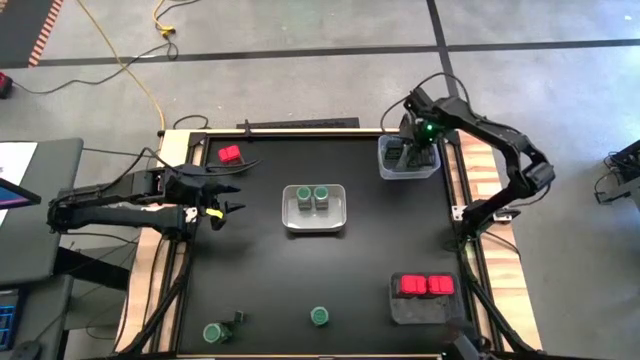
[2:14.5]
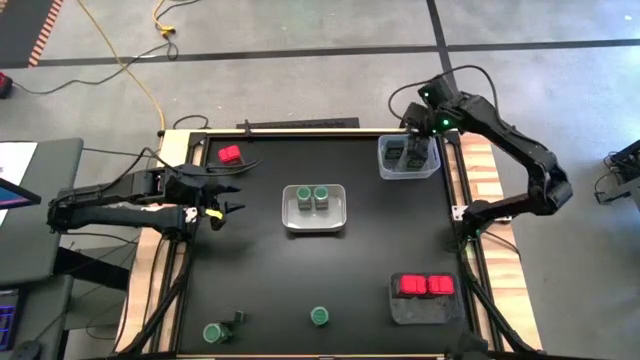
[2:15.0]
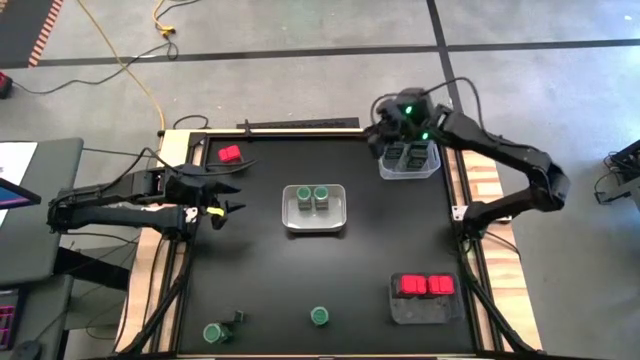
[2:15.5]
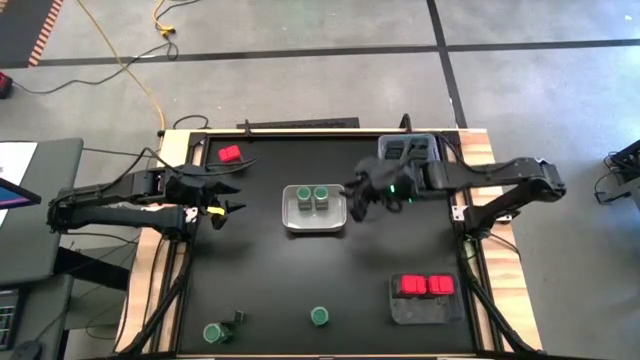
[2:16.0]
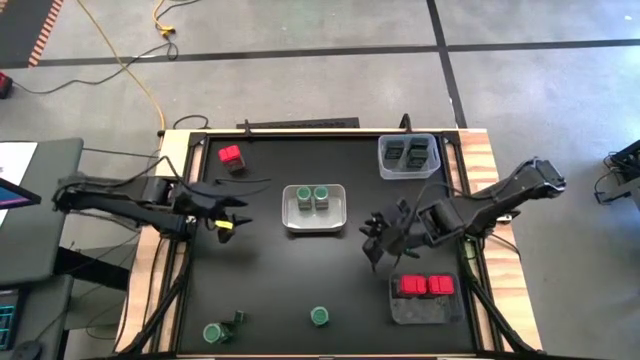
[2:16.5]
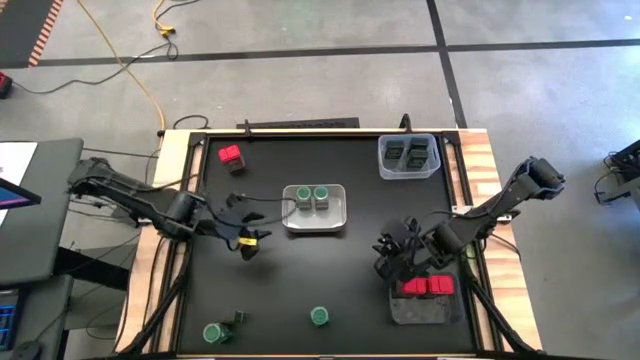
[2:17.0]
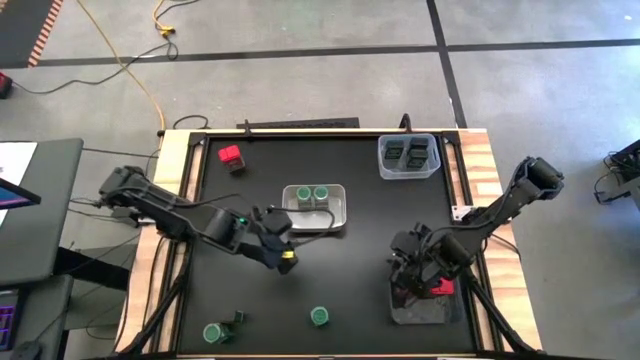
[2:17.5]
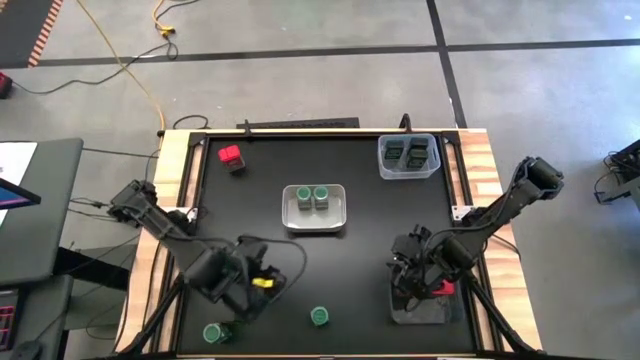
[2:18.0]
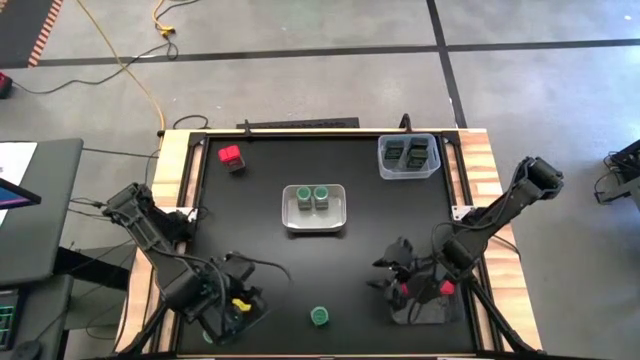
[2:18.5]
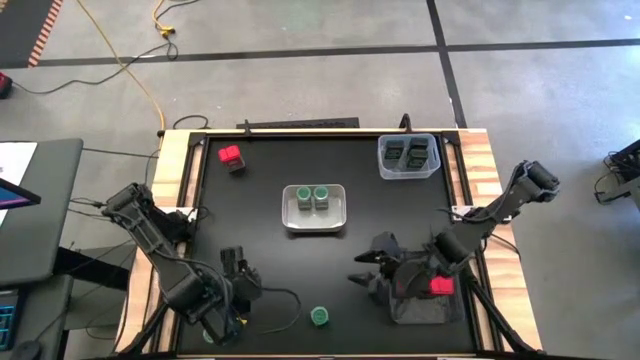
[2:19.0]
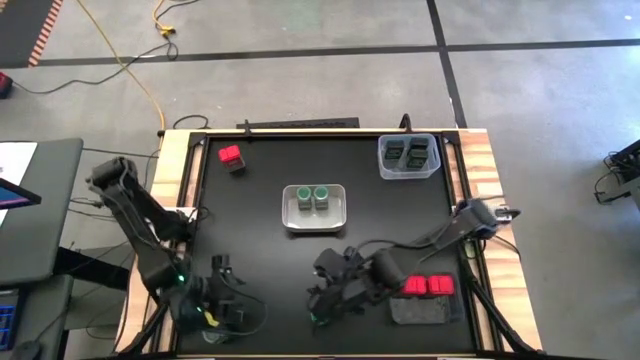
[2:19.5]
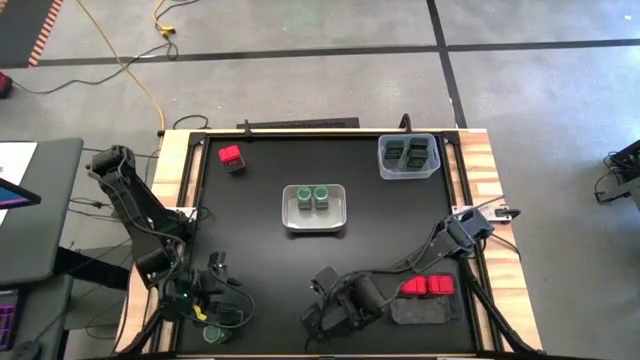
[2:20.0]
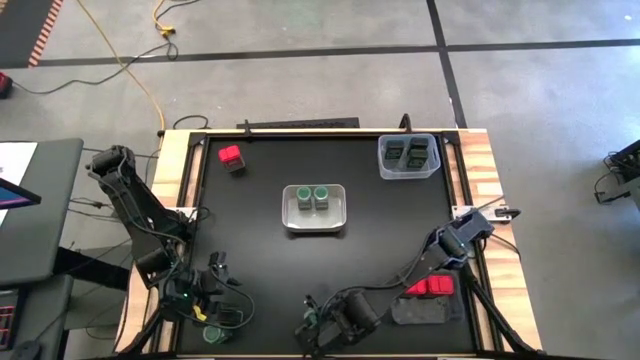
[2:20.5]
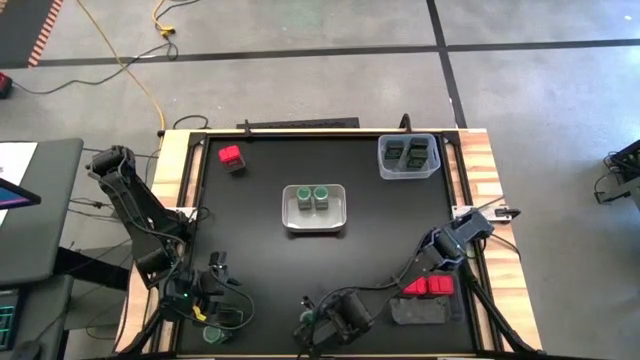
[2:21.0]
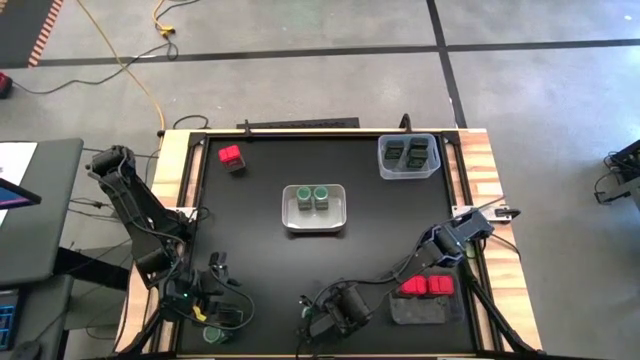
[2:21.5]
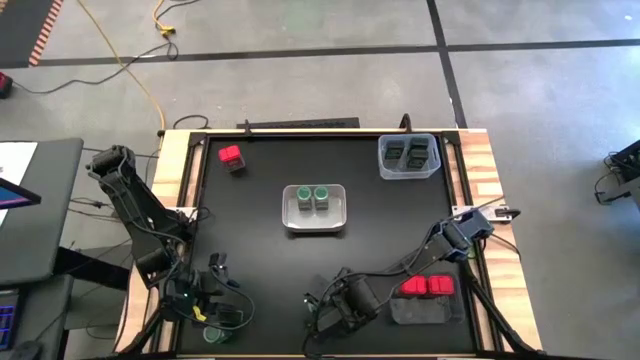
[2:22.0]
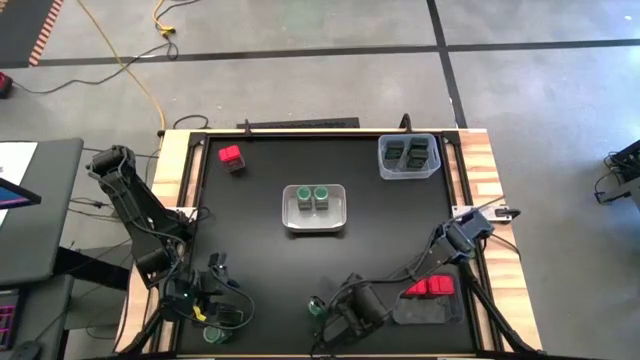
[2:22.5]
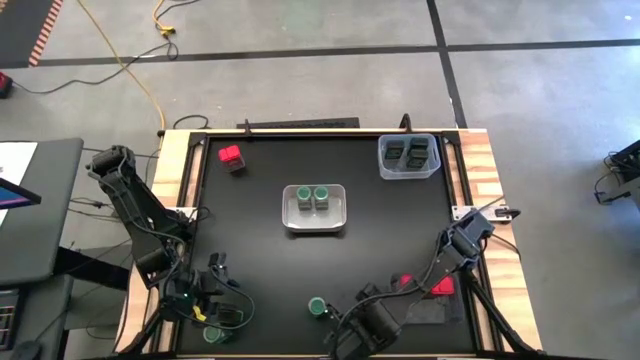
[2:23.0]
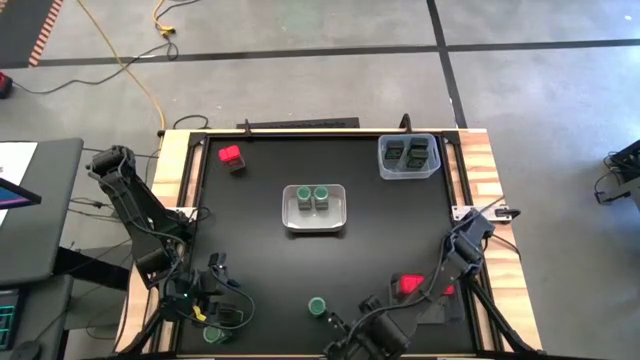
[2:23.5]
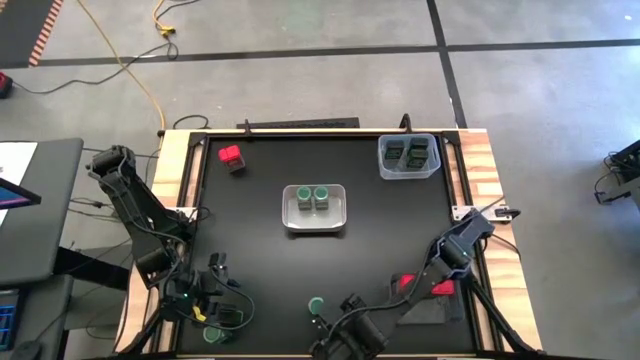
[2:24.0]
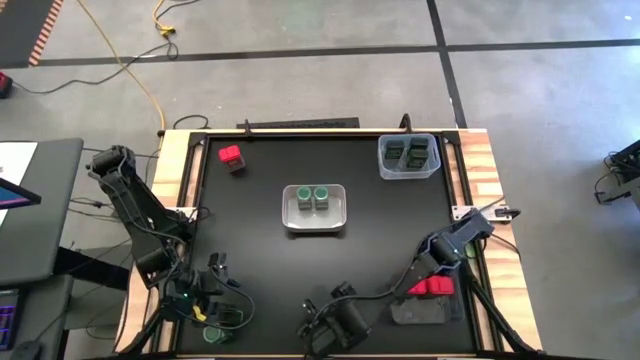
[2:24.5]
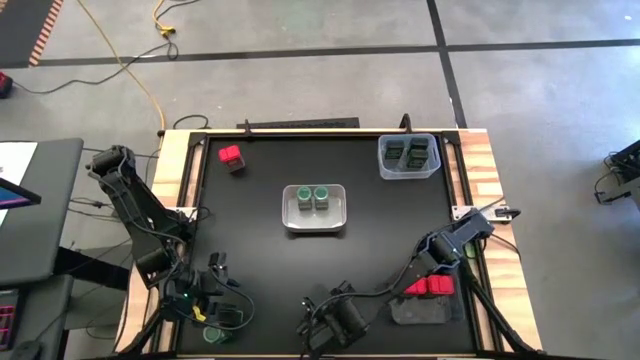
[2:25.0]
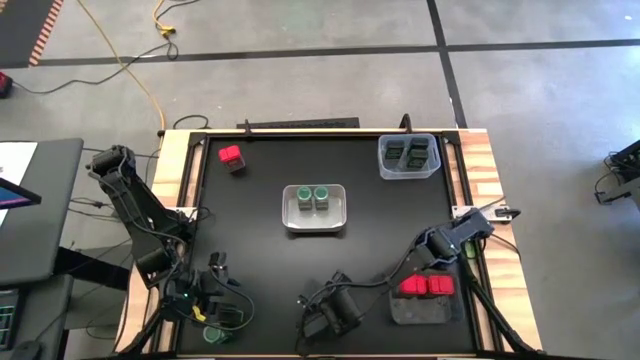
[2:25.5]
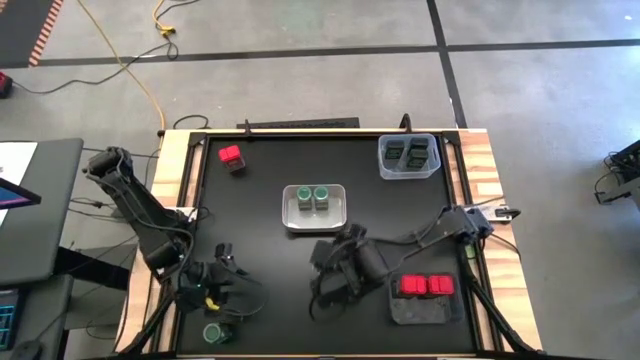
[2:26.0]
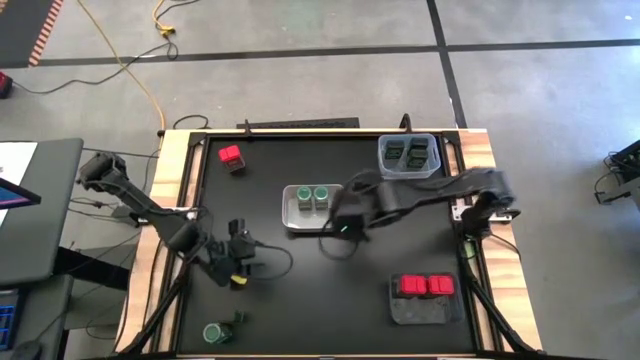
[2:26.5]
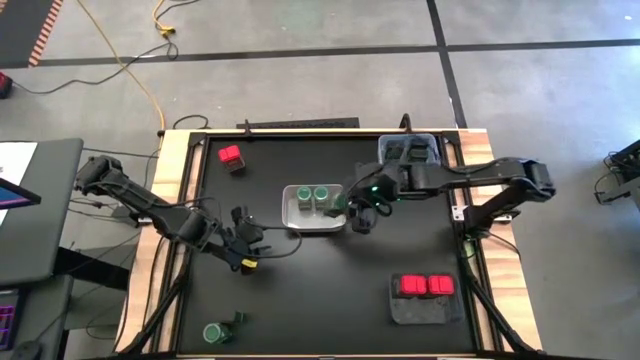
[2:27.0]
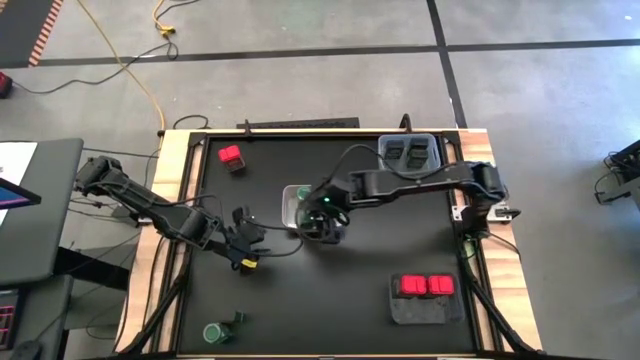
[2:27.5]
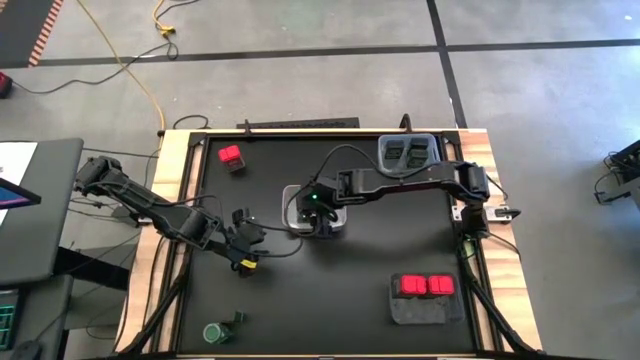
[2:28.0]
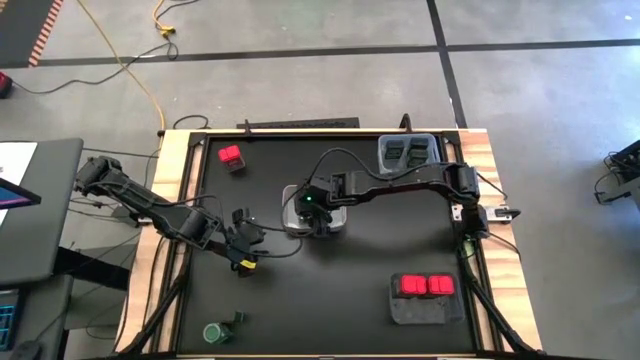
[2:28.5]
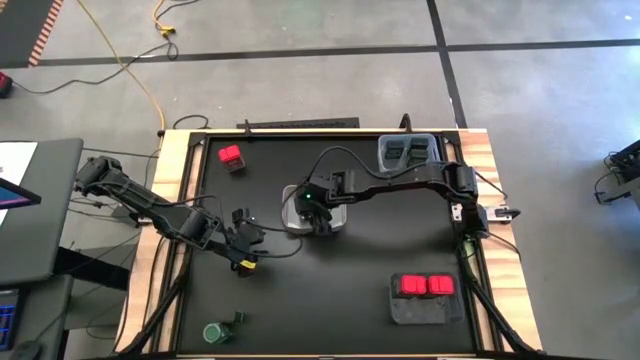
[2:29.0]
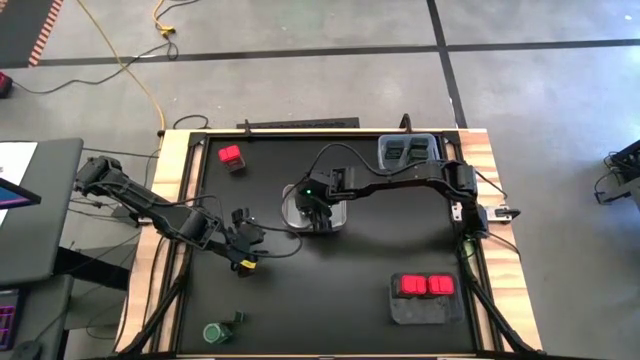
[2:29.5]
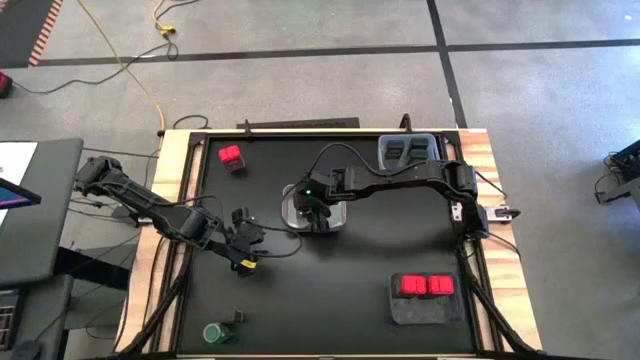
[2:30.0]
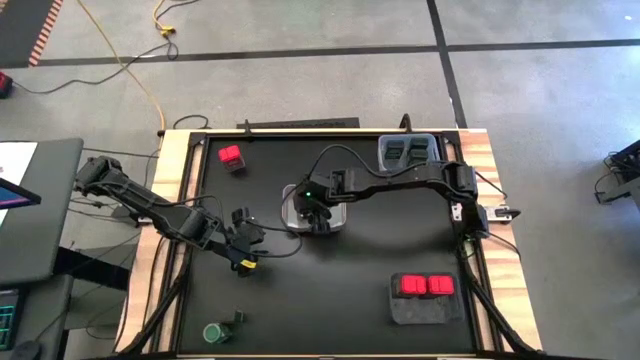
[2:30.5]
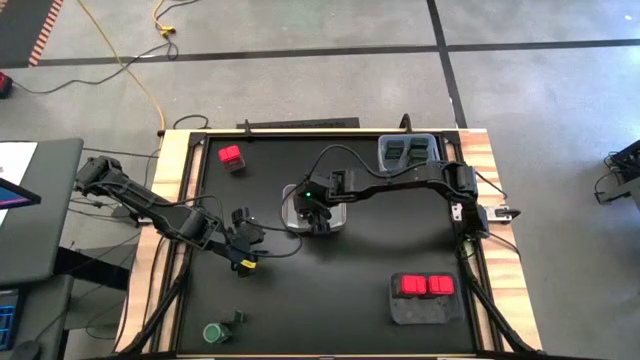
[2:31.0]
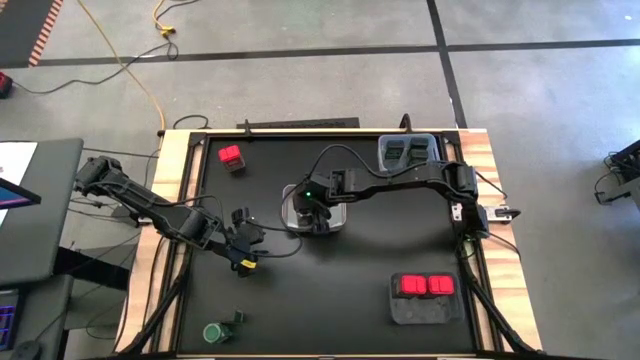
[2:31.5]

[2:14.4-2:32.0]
Task: Sort spices by type
Put the top green seasoning bottle into the white bin

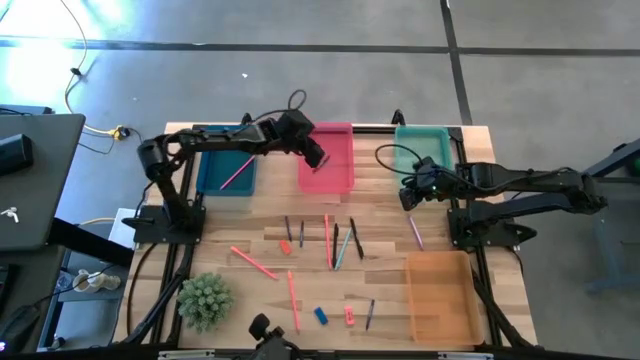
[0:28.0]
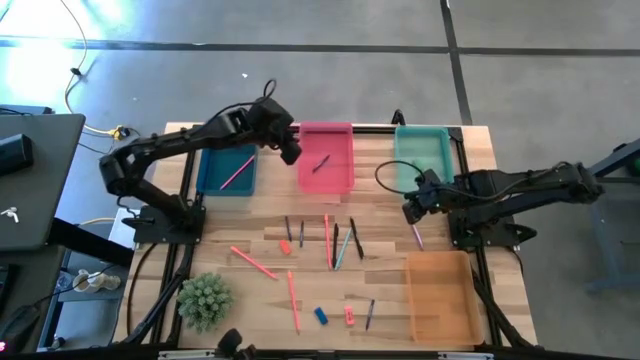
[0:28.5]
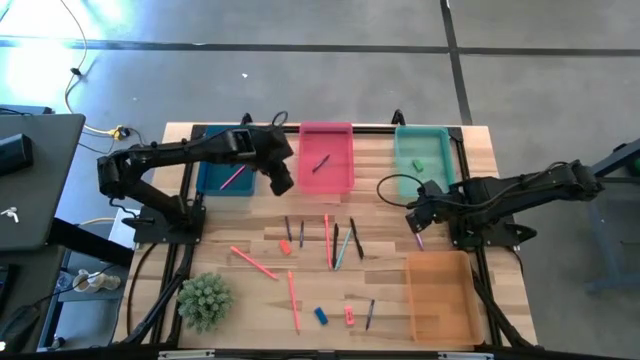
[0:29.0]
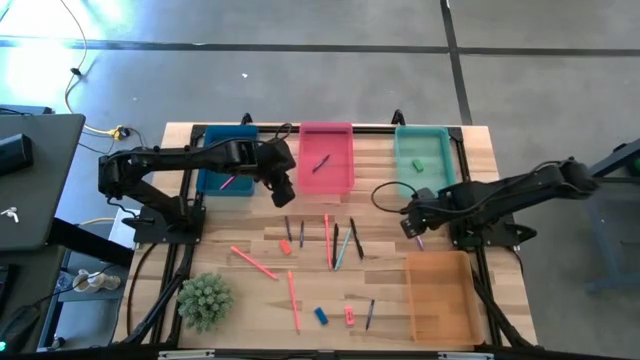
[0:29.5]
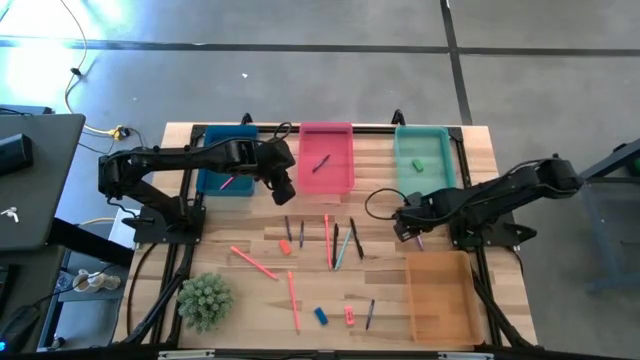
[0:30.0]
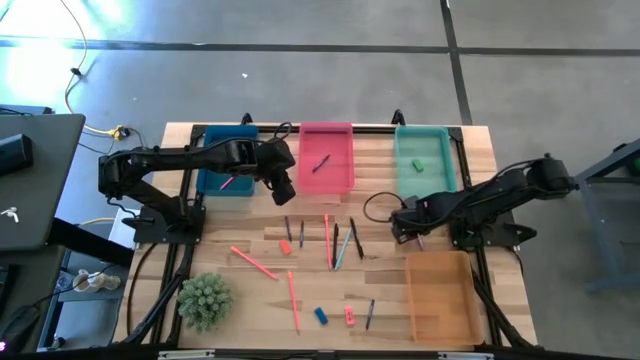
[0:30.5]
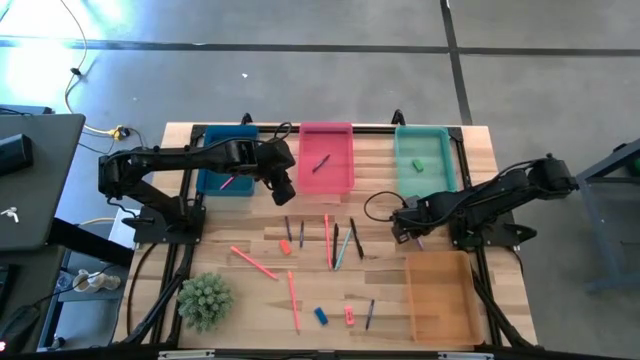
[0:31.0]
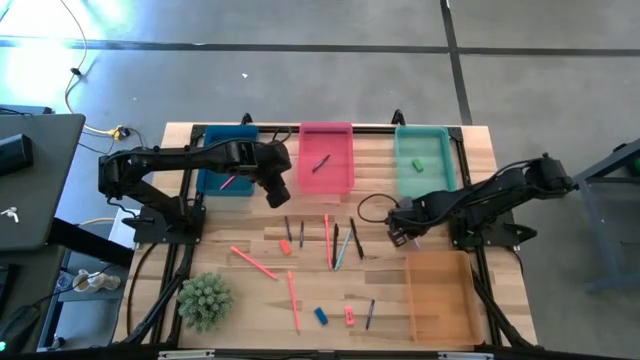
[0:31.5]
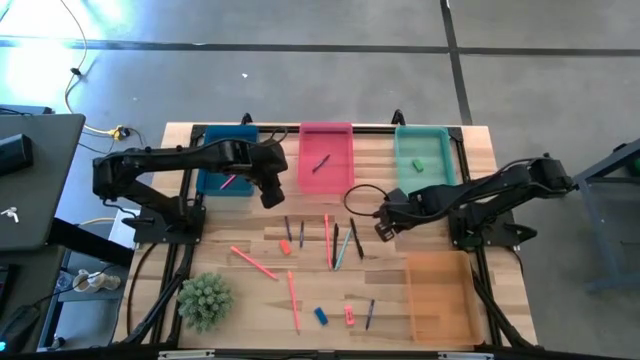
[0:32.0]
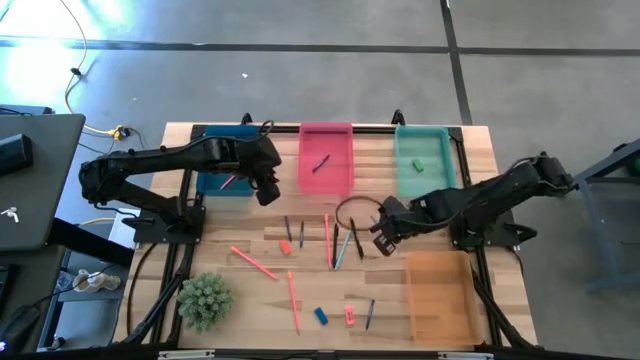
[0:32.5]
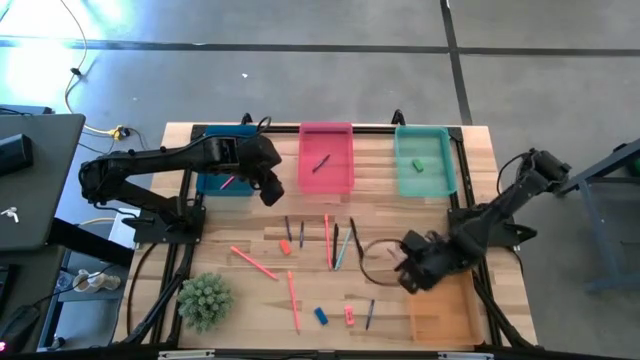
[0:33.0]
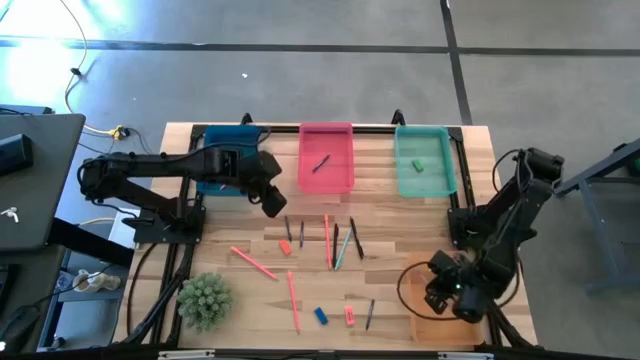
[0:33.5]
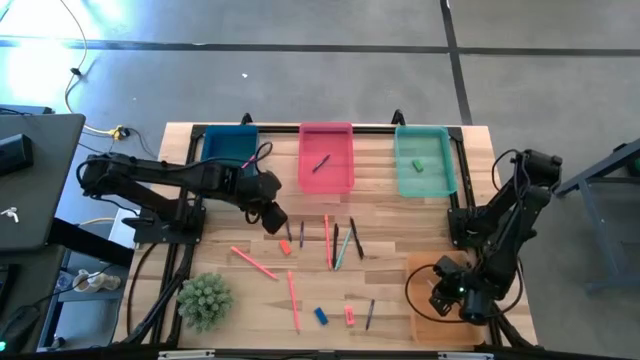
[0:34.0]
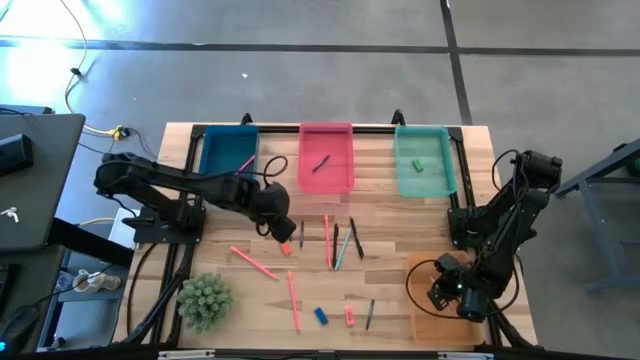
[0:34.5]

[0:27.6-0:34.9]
Task: Sort crayons/erasers/pens/pencils in bins
Put the pink pen into the orange bin
